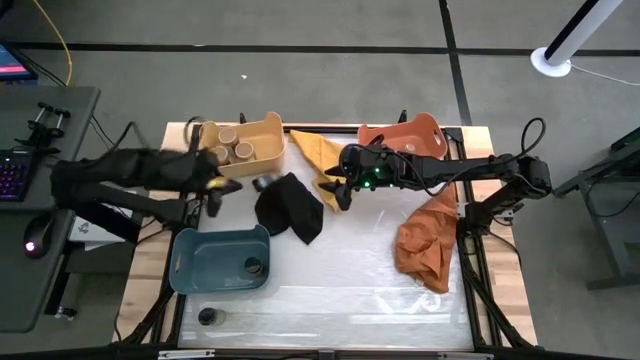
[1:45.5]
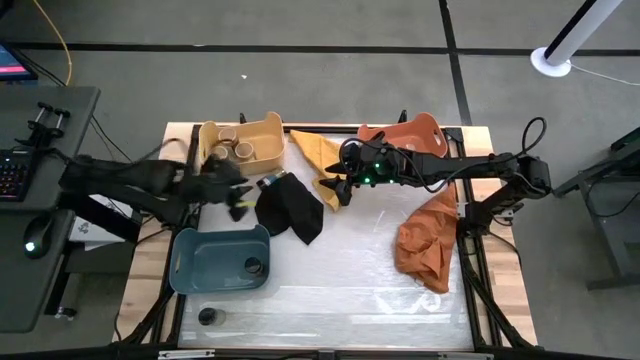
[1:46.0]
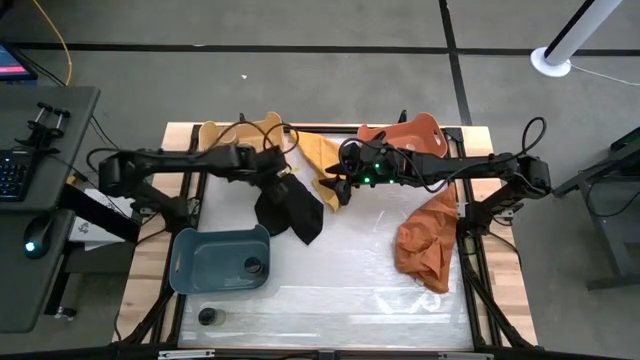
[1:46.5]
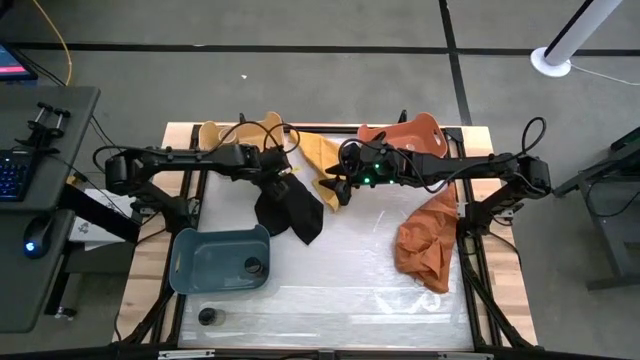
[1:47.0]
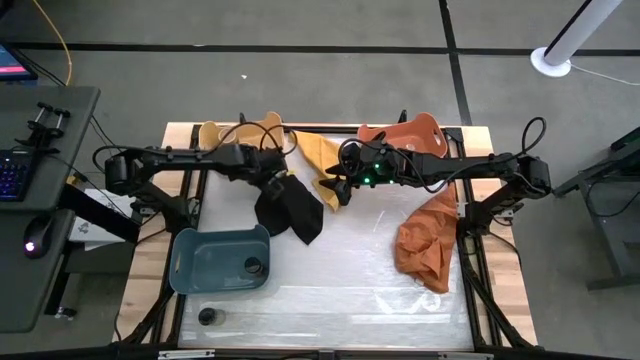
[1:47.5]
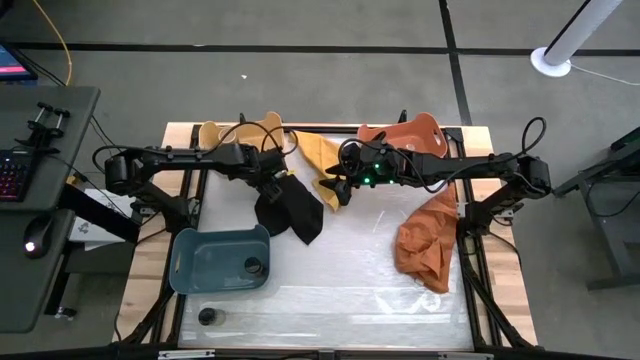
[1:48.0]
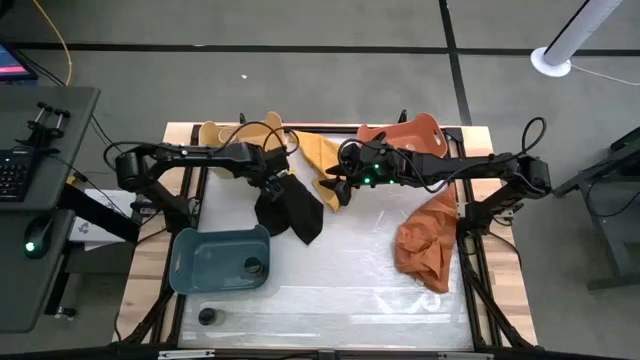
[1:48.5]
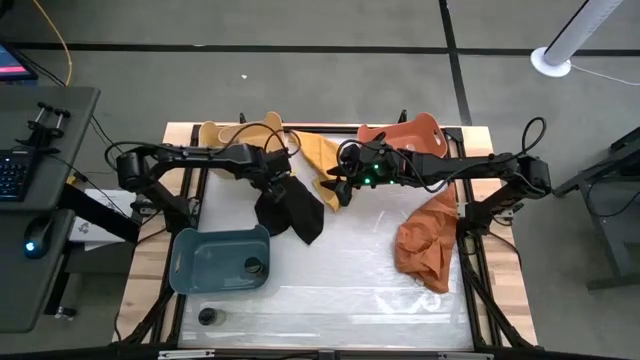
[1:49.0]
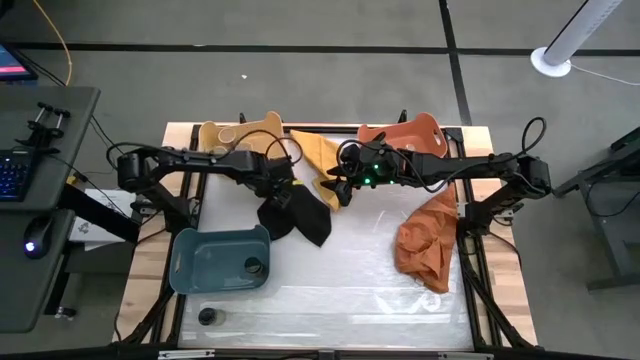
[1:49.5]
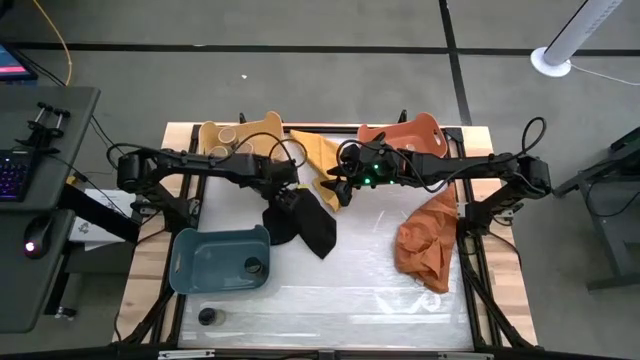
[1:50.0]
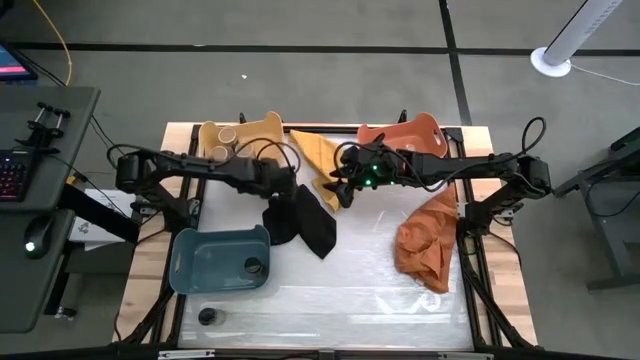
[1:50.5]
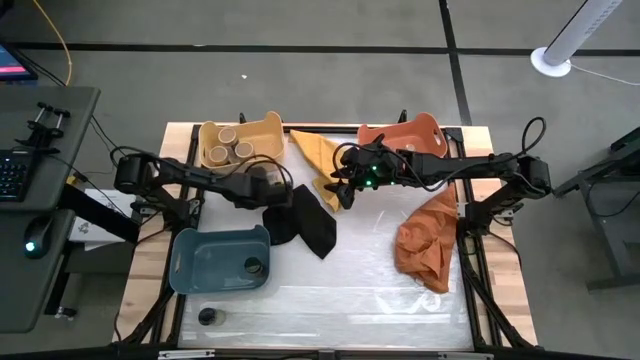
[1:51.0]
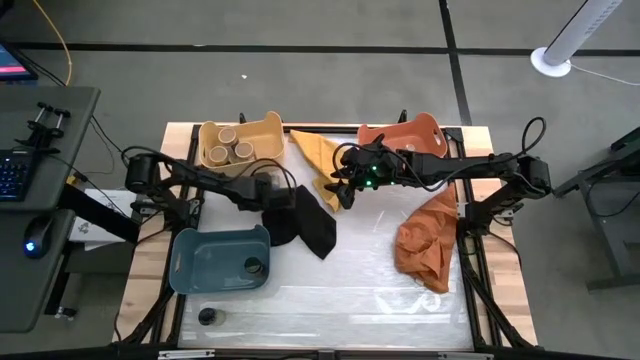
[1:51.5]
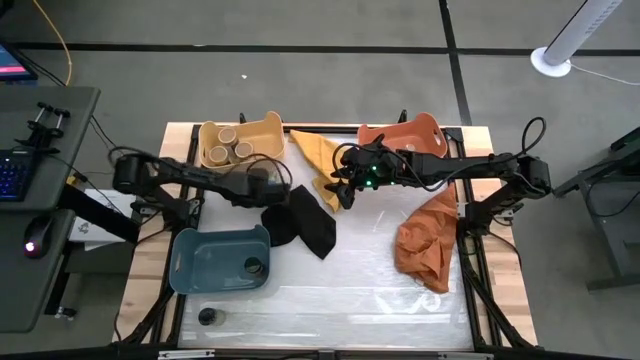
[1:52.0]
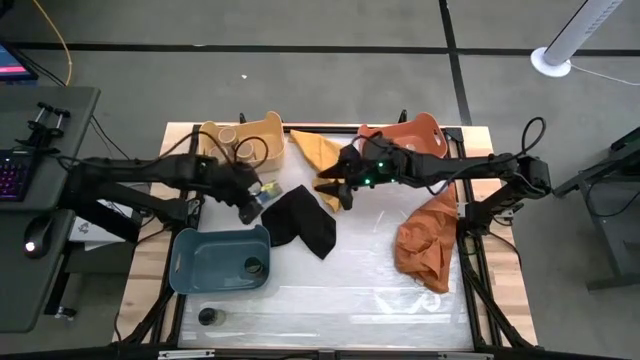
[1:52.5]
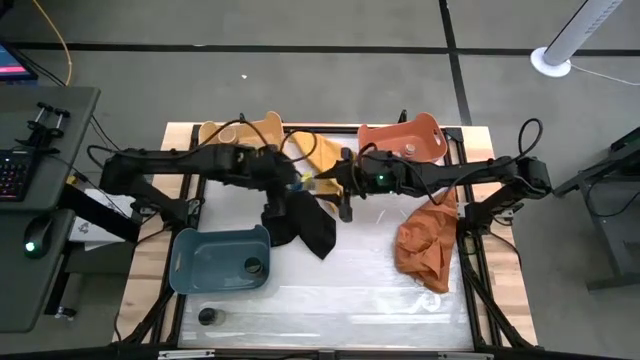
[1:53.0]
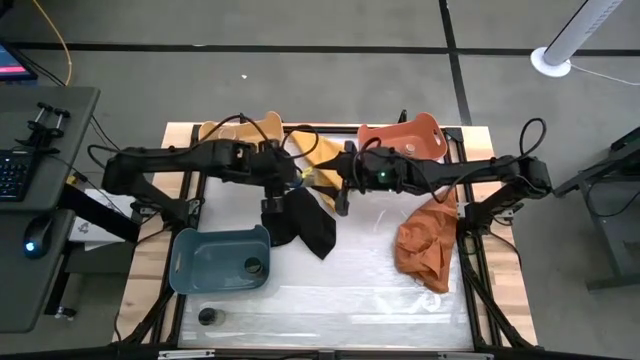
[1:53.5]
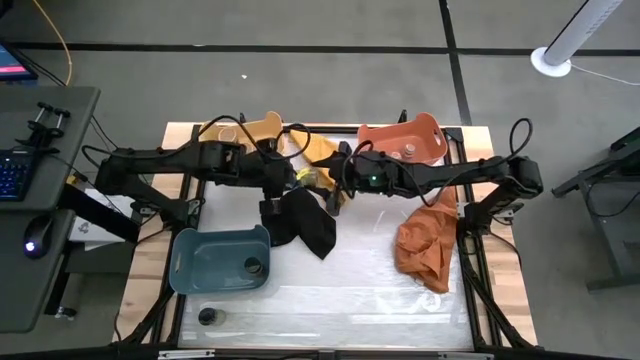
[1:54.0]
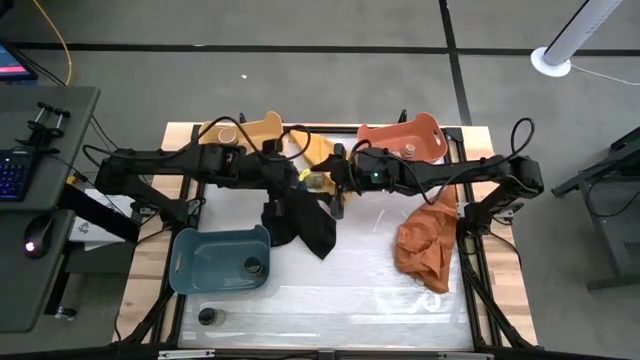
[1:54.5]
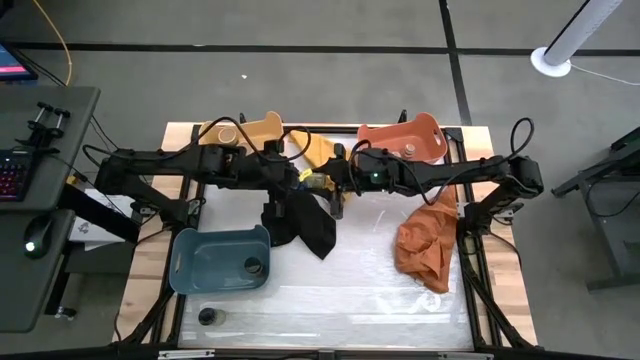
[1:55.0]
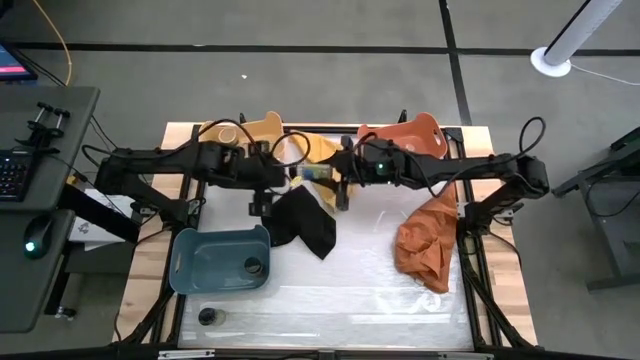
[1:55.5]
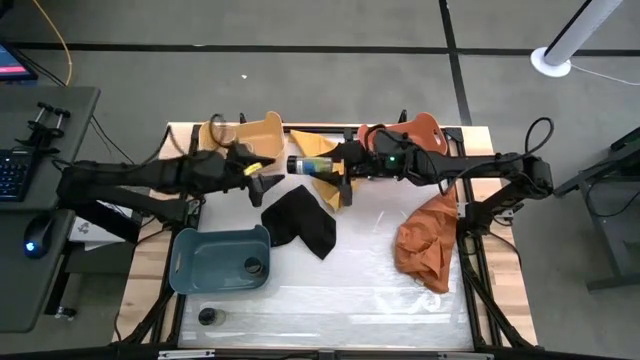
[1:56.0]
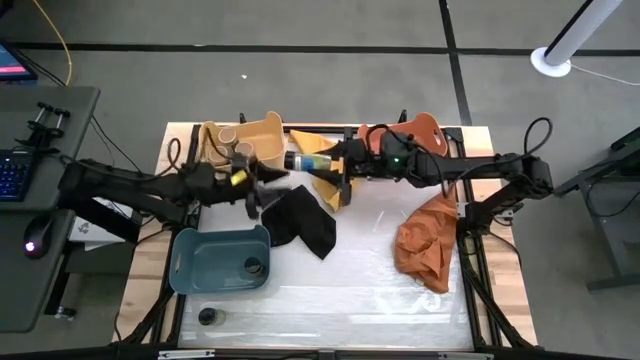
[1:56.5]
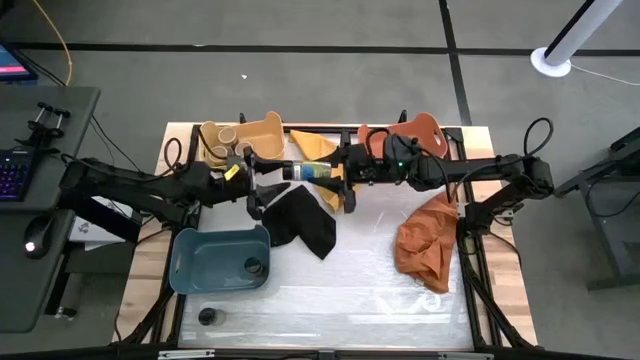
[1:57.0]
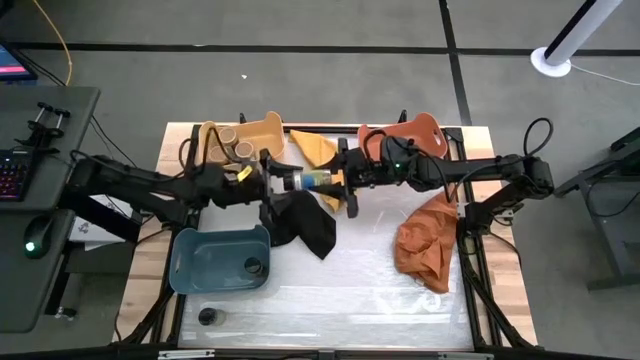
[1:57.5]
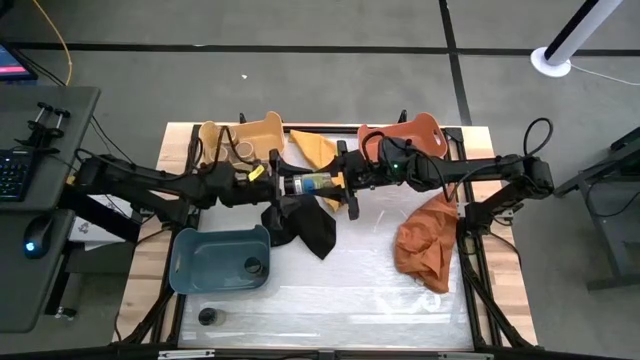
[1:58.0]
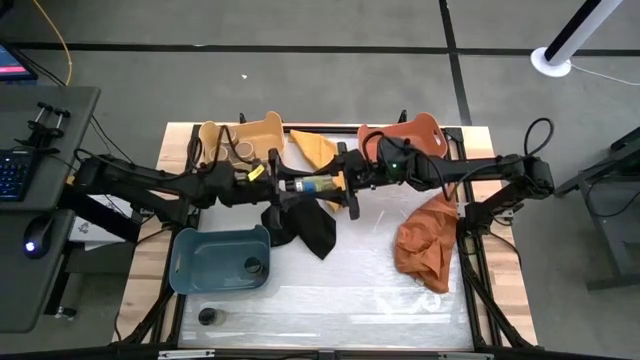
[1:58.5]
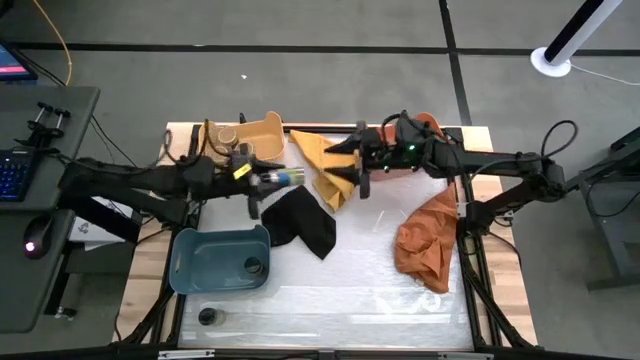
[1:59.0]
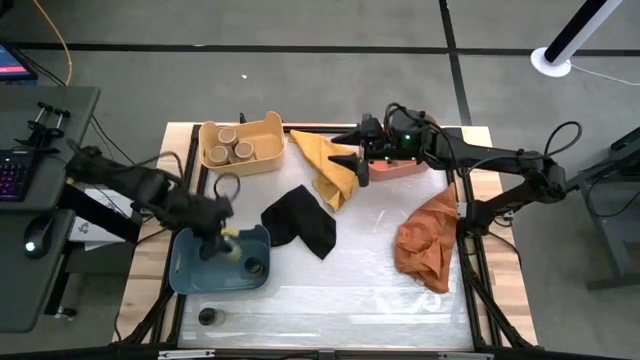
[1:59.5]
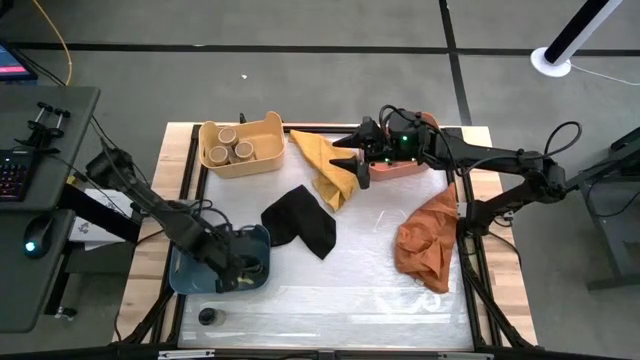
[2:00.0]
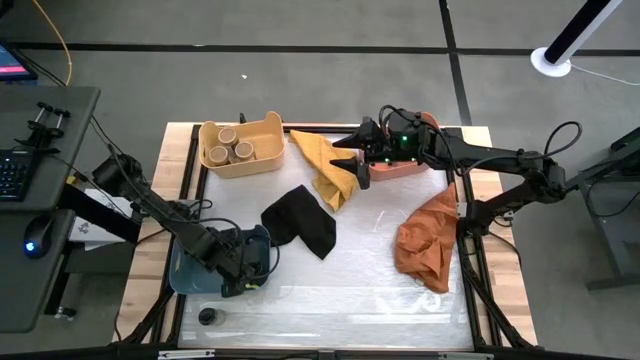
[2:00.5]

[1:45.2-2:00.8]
Task: Sort spices by type
Put the top black spice bottle into the blue bin

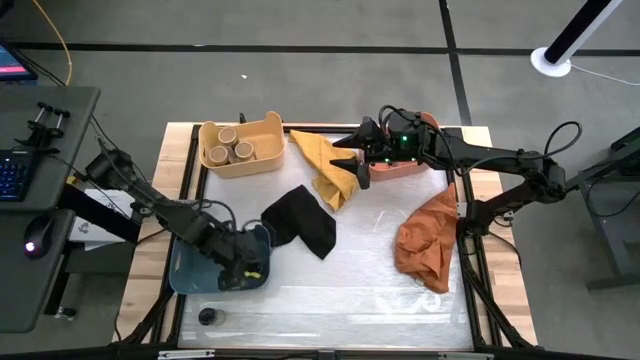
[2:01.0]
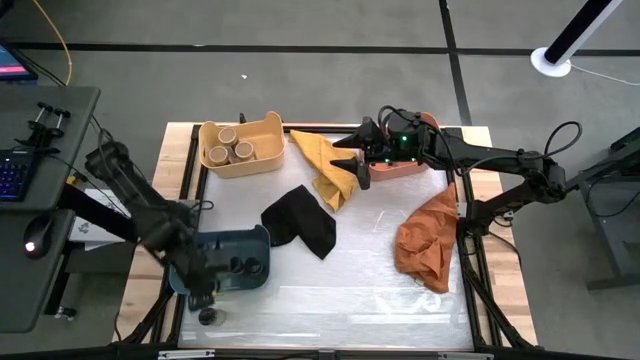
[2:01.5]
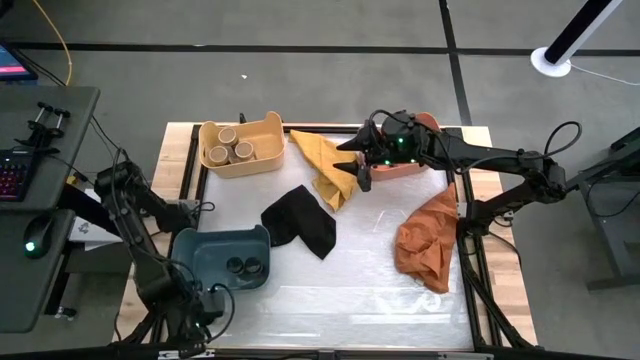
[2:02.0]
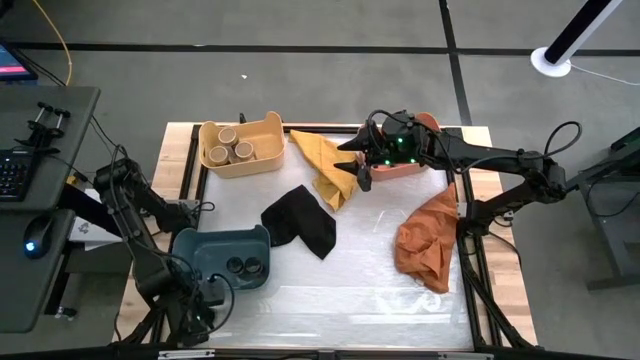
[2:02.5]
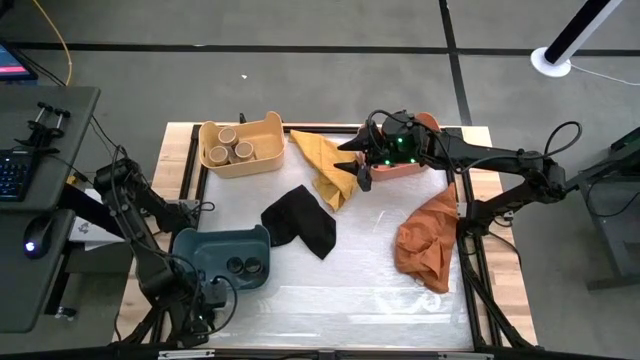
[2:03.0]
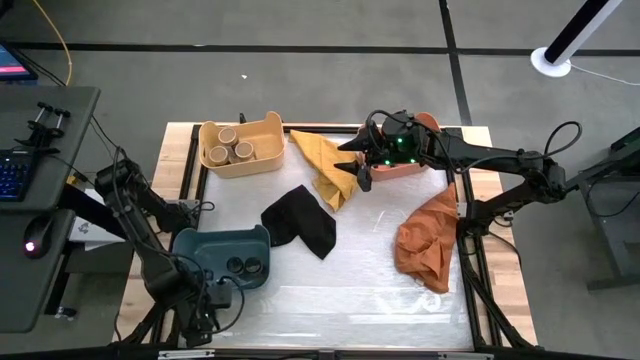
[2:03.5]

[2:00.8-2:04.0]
Put the black spice bottle into the blue bin

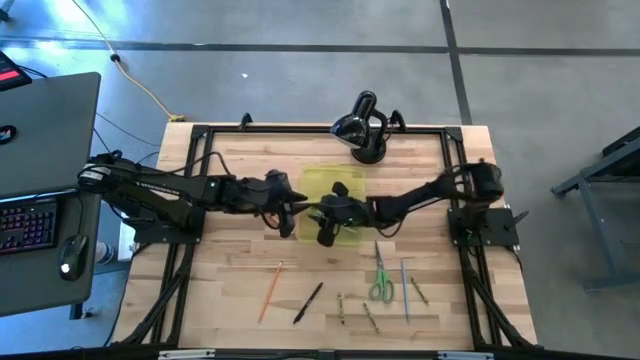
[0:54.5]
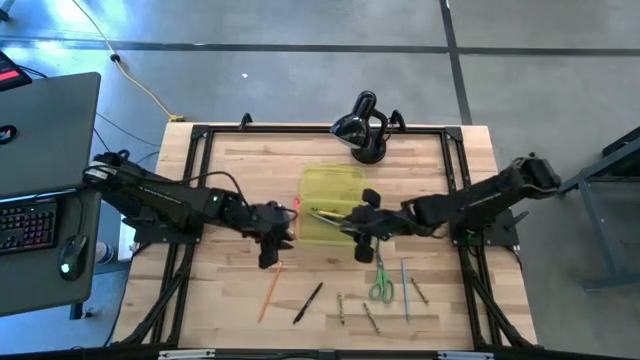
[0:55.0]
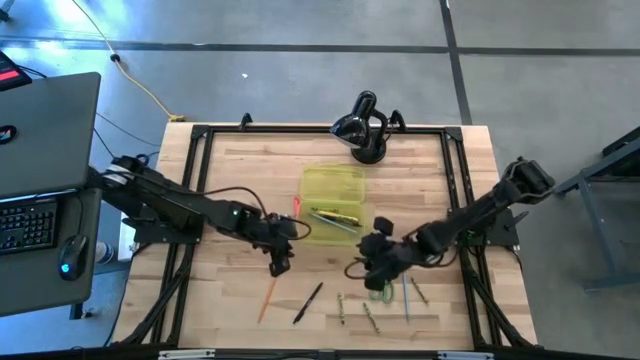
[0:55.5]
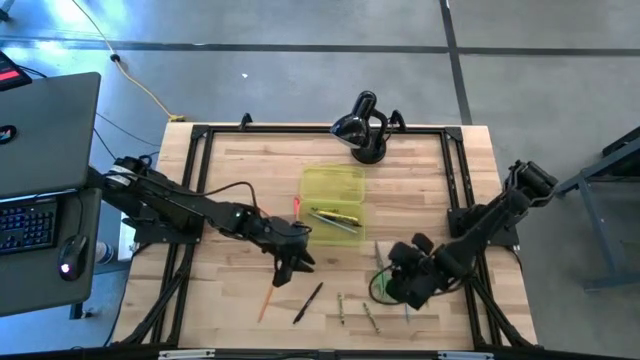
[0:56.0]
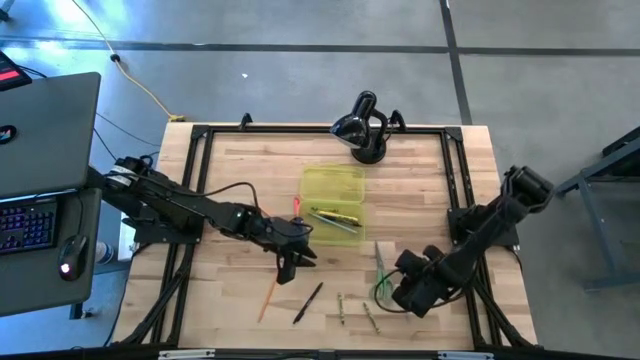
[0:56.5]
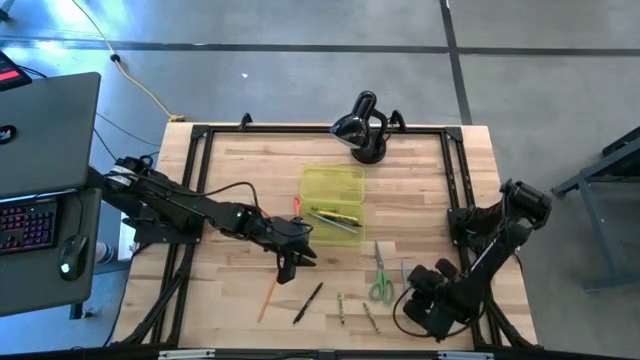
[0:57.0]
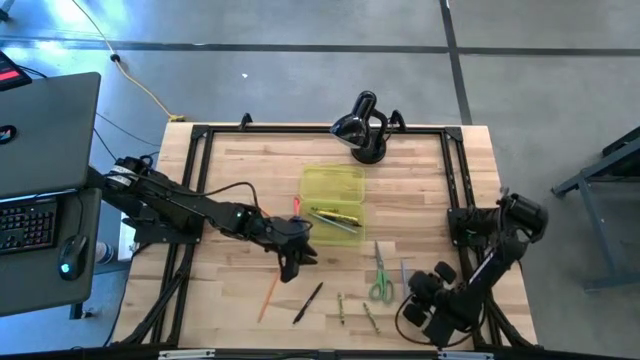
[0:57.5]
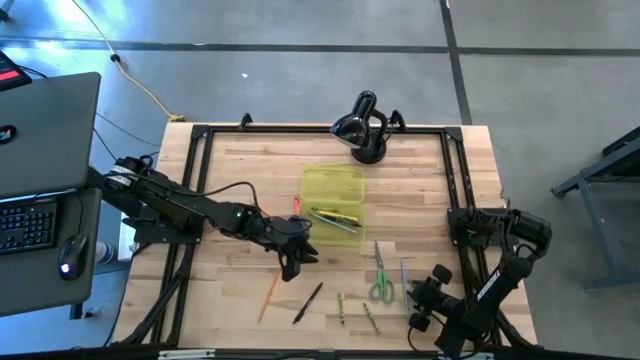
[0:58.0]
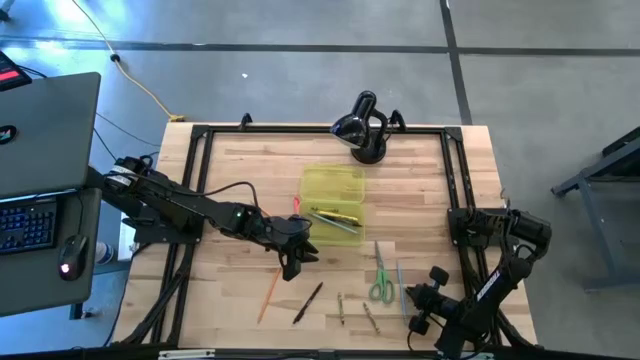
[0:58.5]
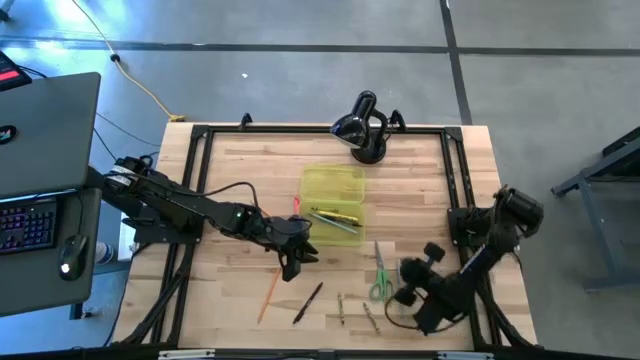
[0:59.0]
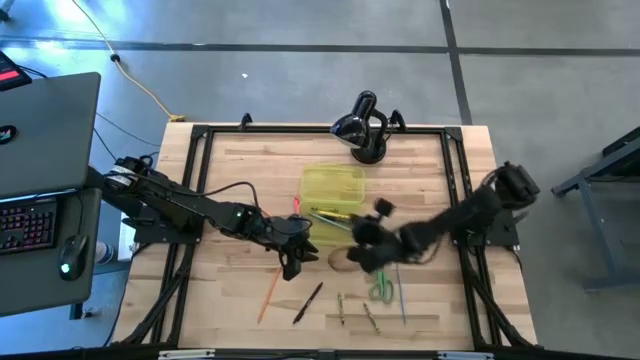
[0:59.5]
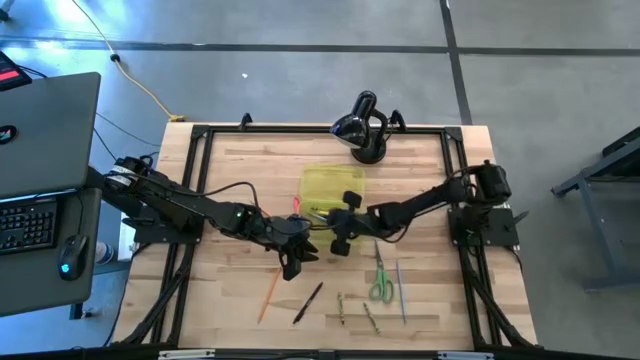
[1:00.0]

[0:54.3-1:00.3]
Task: Pick & place school supplies into a supply box
Put the green crayon into the yellow school supply box
